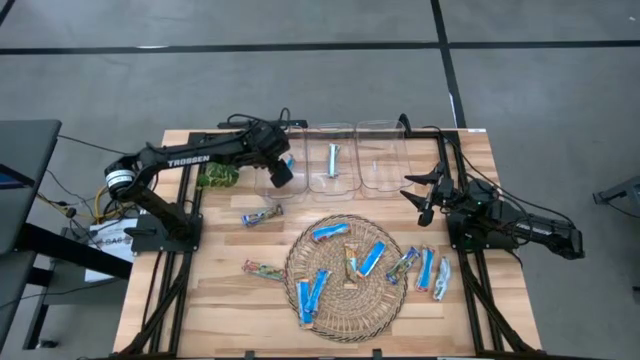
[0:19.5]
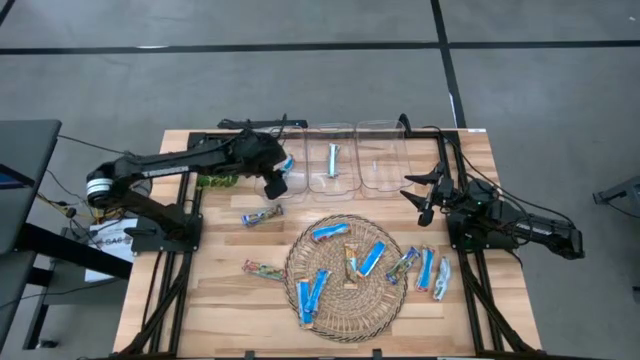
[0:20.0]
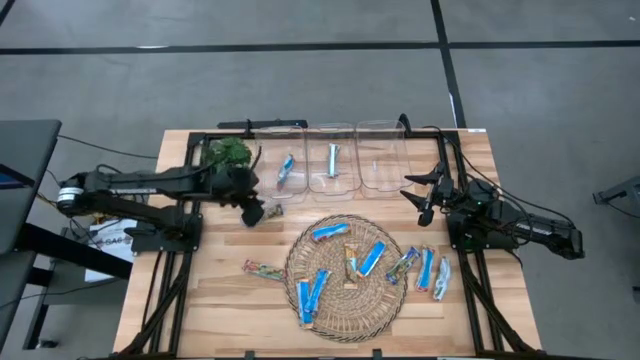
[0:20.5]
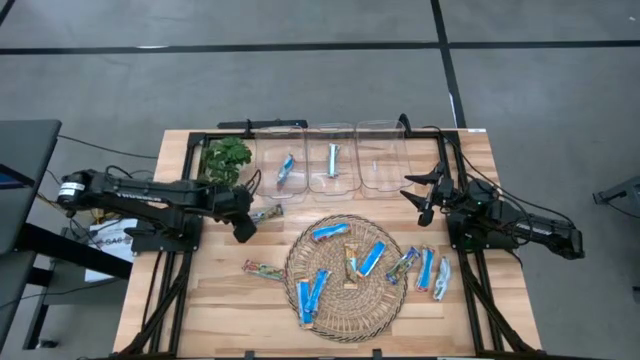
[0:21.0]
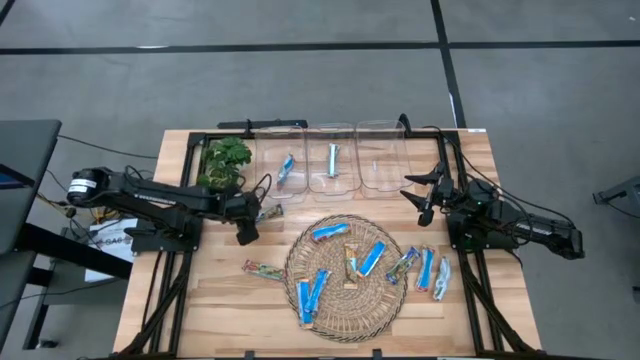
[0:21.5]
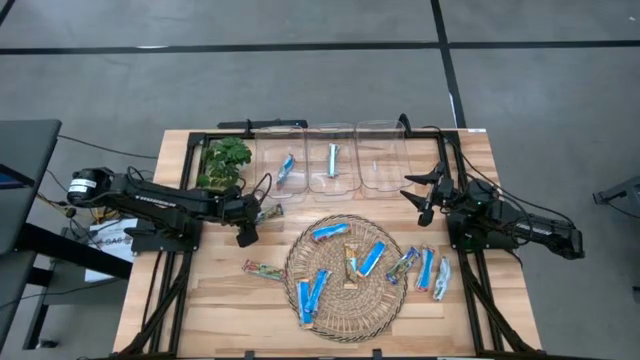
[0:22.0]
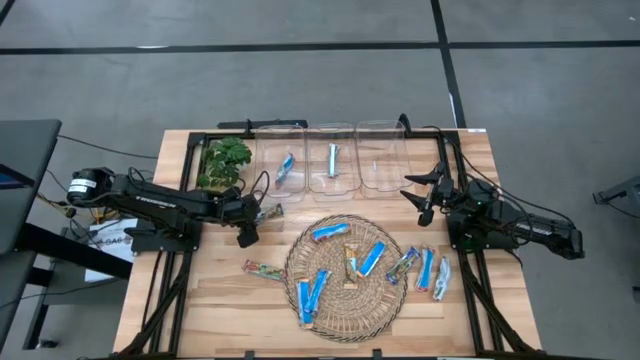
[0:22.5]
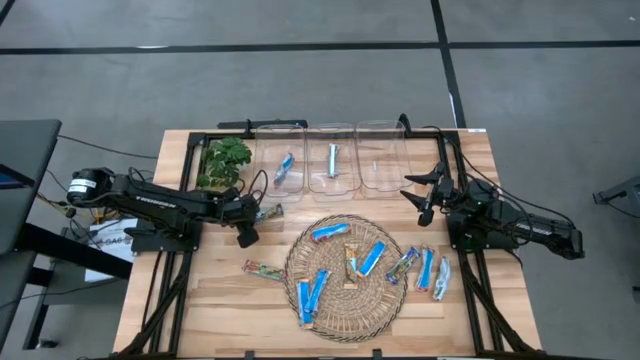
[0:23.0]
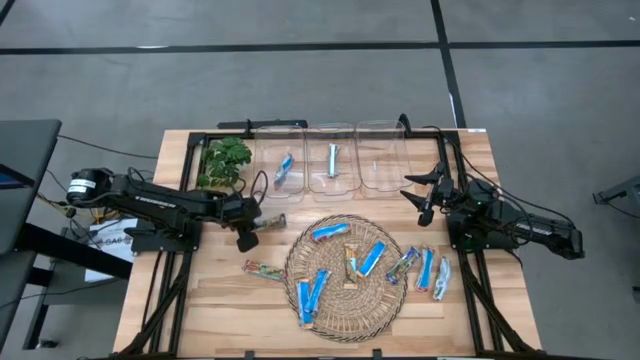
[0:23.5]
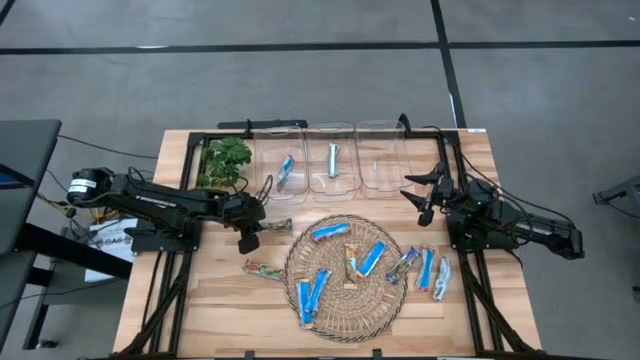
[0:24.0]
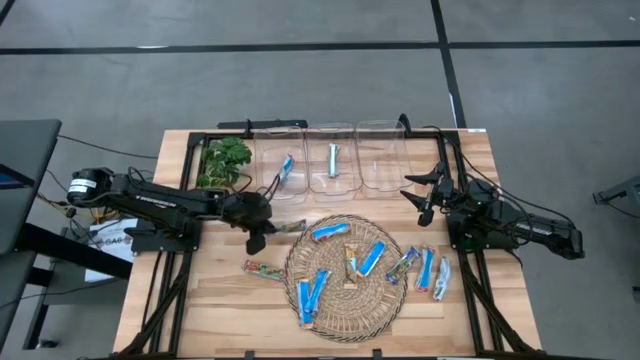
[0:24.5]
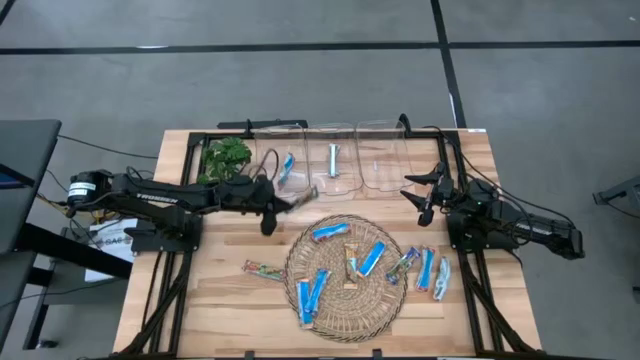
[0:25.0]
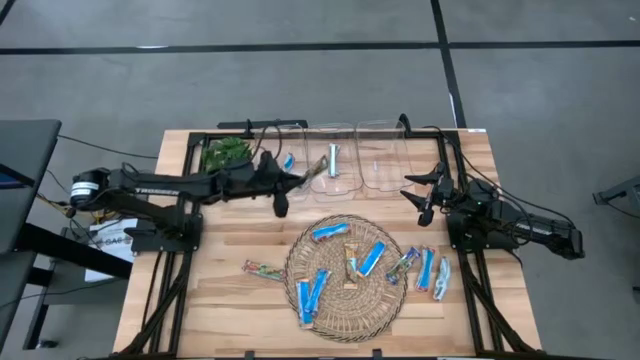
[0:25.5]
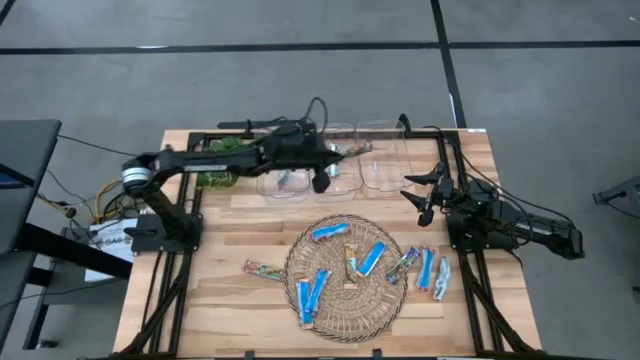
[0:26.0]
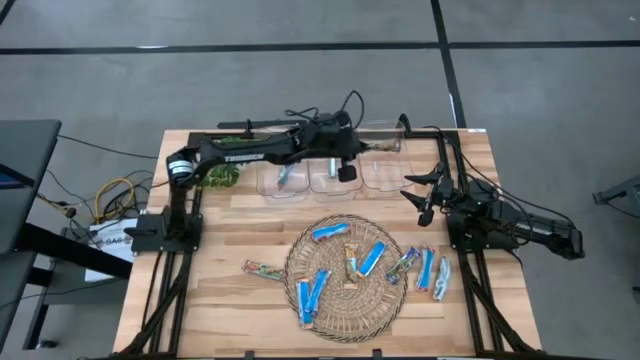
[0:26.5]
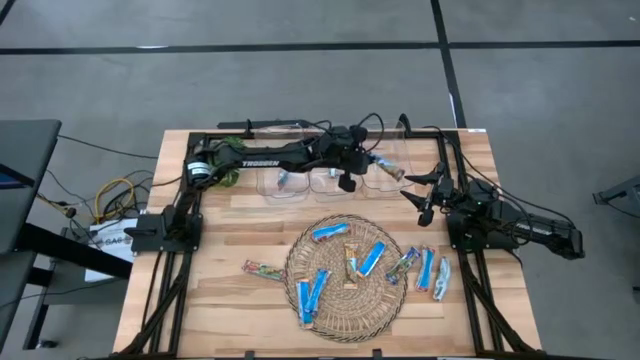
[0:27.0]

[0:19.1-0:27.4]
Task: Pick and place Granola Bars by type
Put the blue granola bar into the right transparent bin

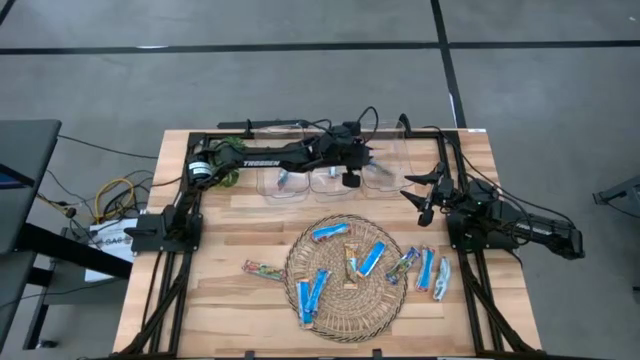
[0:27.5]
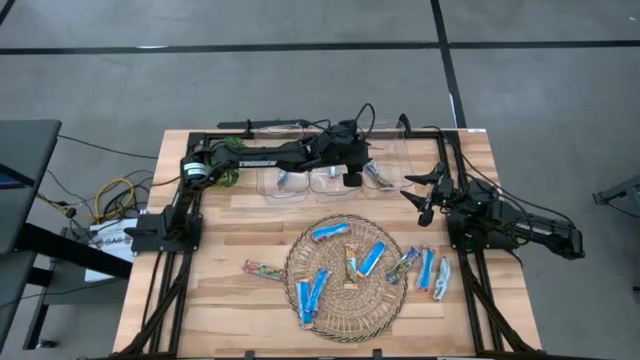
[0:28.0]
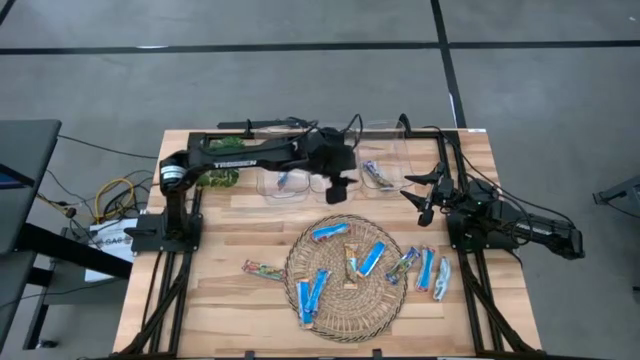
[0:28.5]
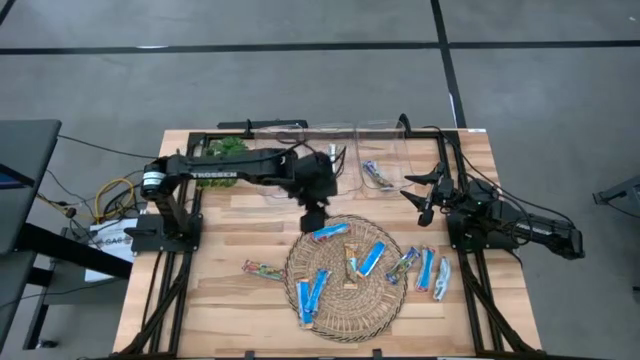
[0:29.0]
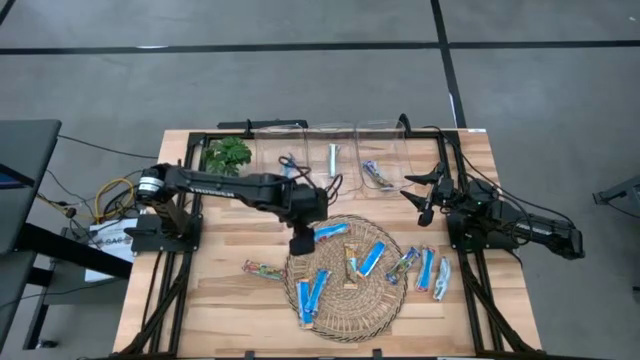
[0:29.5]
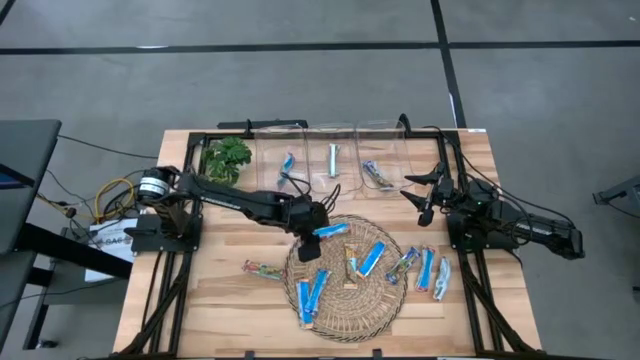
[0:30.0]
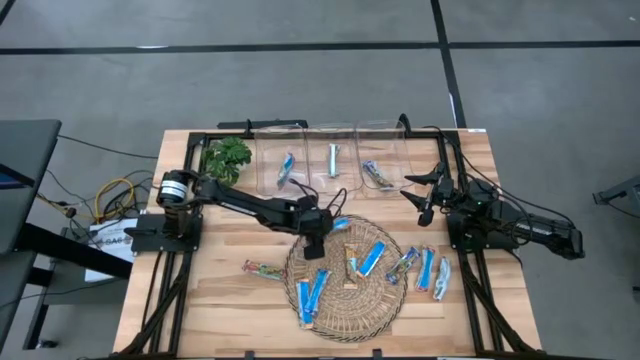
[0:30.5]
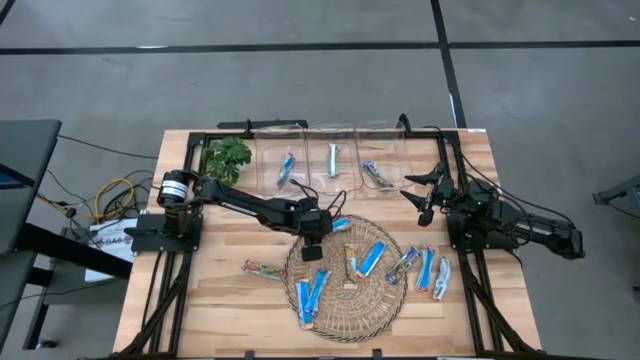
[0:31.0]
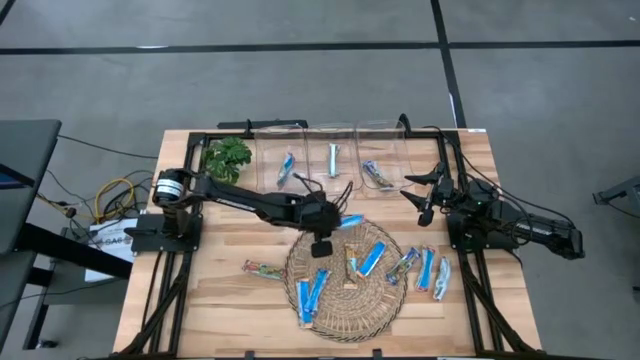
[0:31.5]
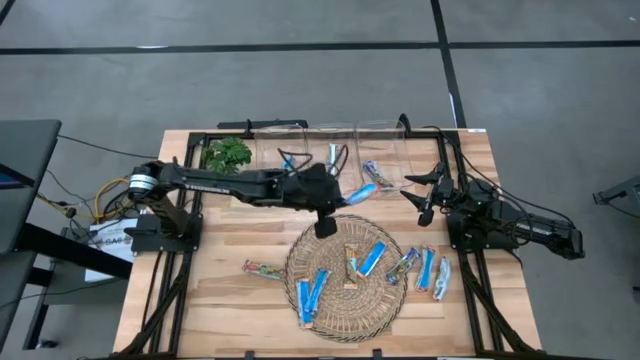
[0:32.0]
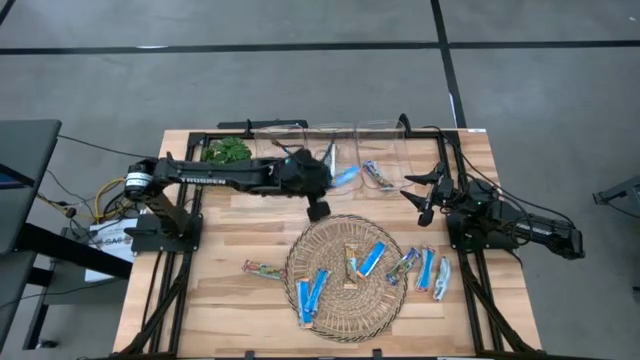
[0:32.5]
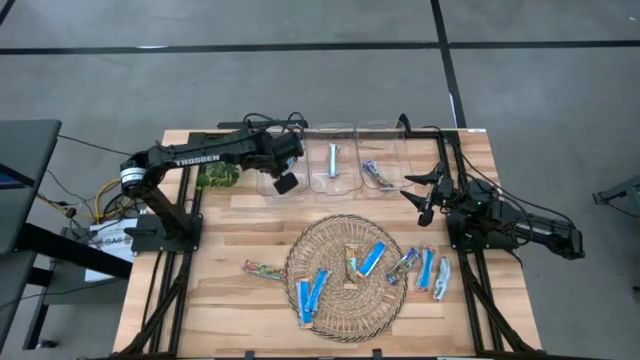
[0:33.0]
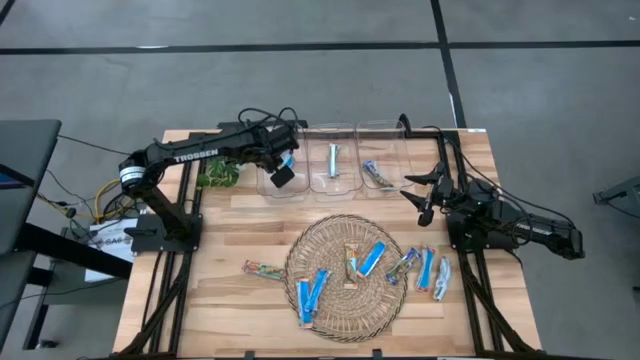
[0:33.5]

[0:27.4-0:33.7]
Put the red granola bar into the left transparent bin

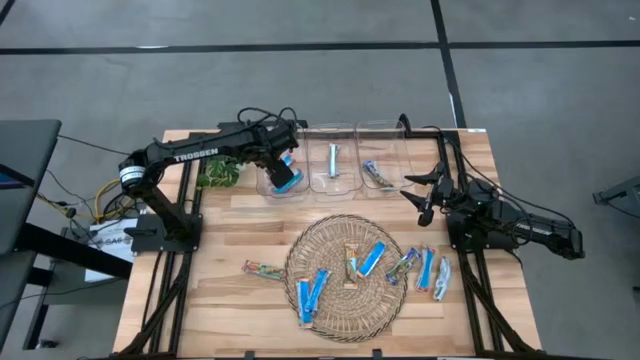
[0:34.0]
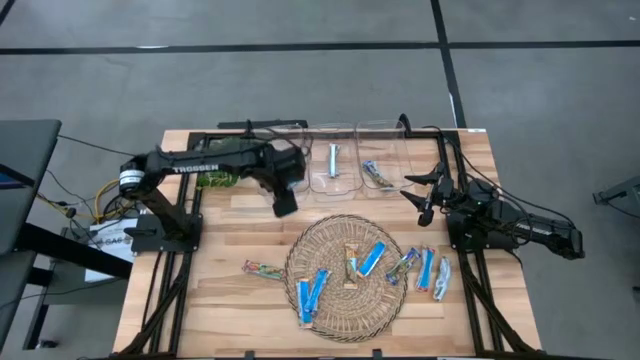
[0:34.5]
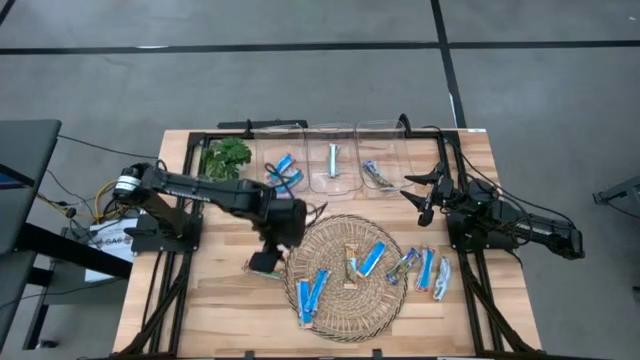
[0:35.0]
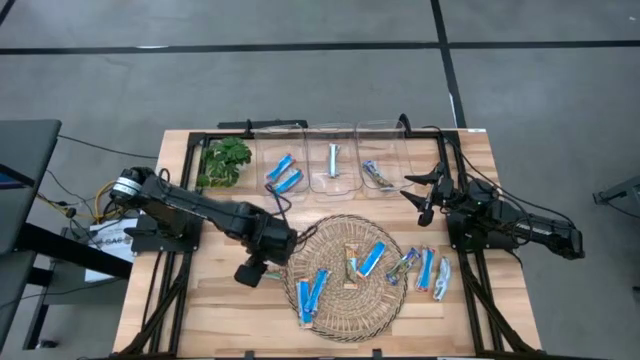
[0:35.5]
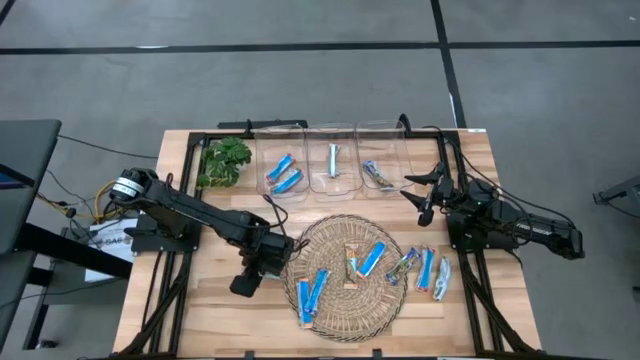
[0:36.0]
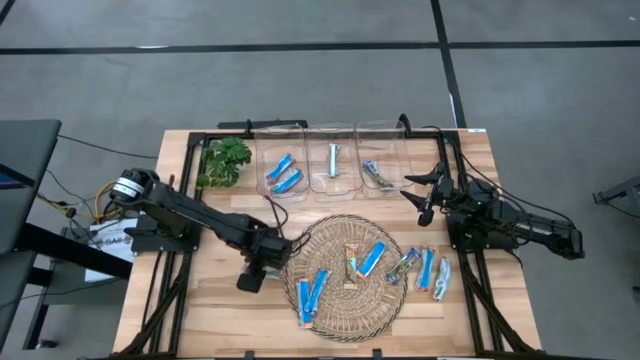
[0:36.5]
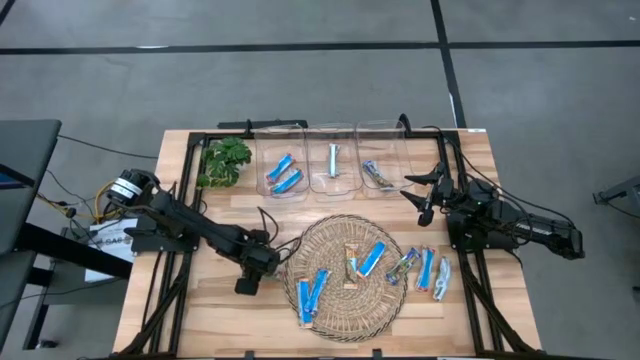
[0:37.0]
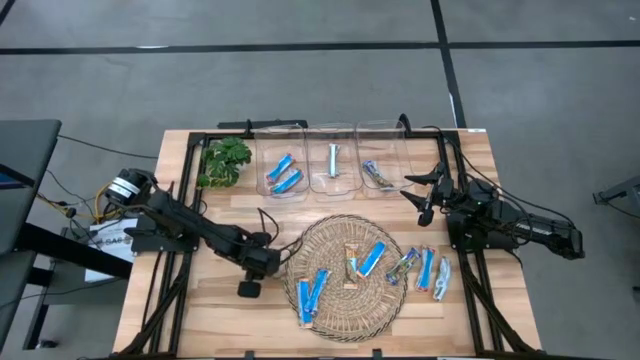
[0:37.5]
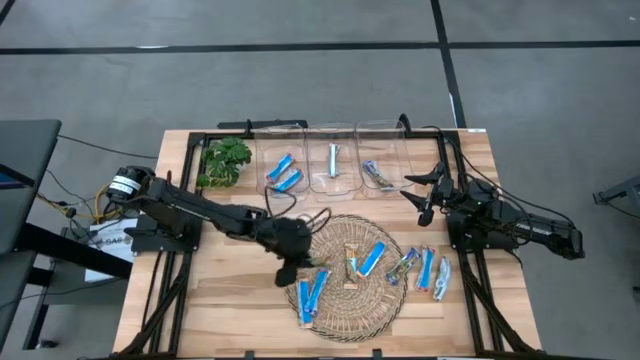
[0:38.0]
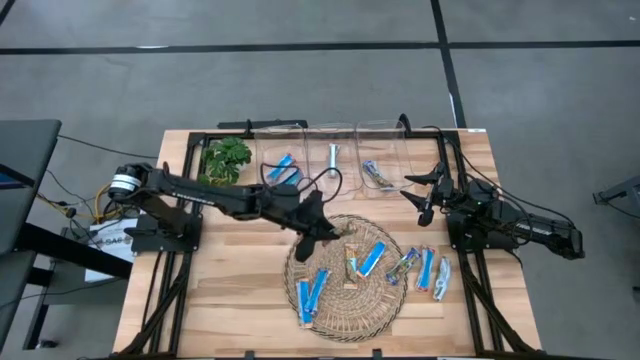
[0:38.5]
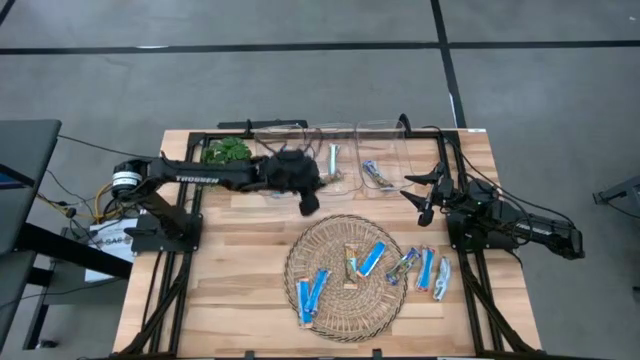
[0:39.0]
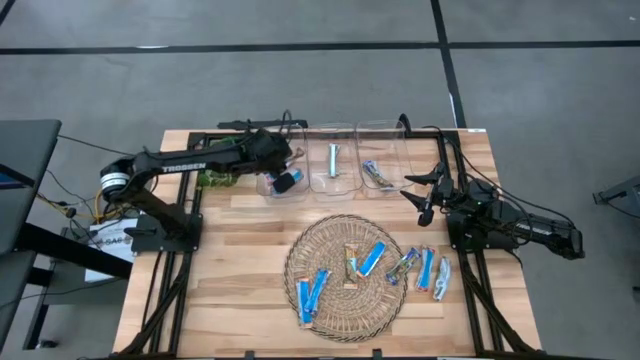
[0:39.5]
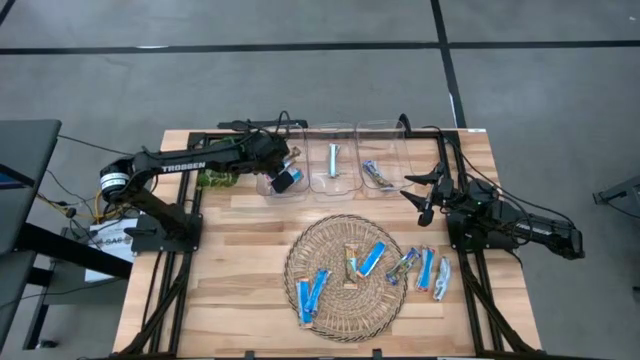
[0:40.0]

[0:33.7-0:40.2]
Put the red granola bar into the left transparent bin

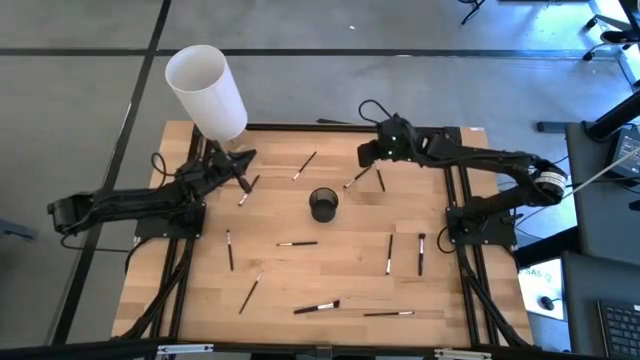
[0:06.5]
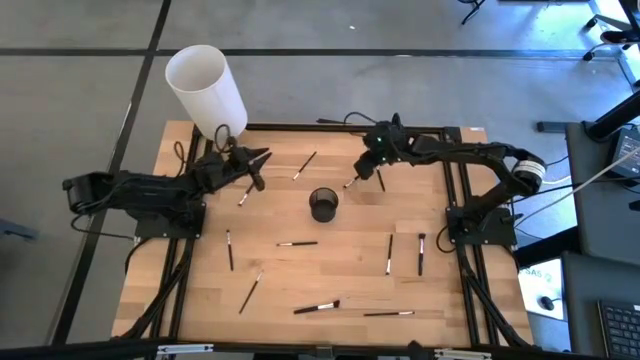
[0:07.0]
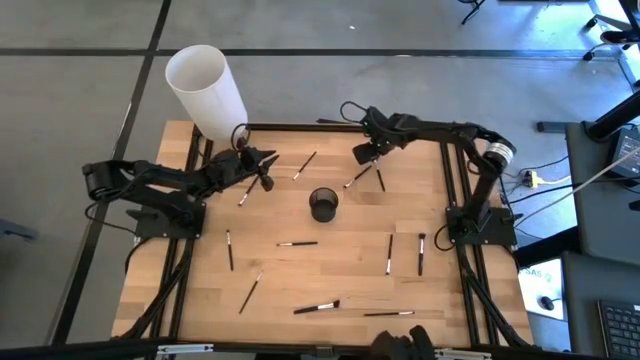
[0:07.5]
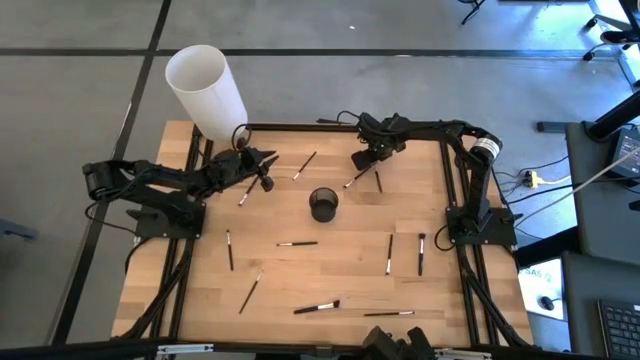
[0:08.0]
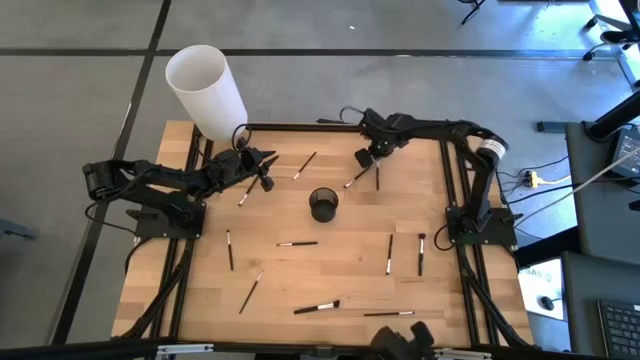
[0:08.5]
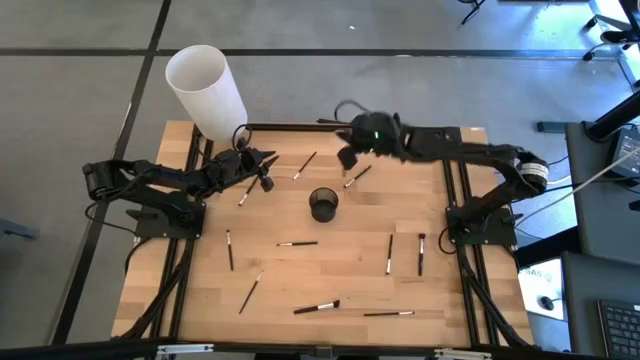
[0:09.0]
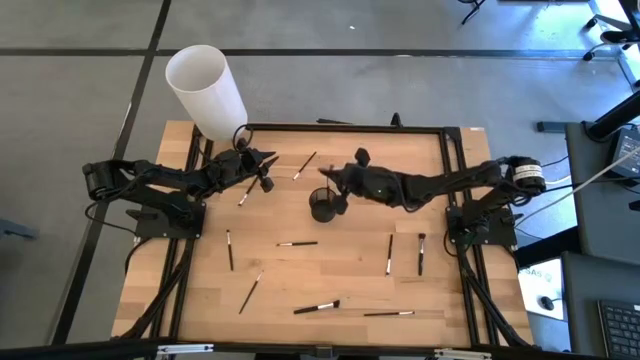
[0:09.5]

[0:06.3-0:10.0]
Task: Pick & Place Makeup Brushes
Put the highlighter brush into the makeup brush holder
